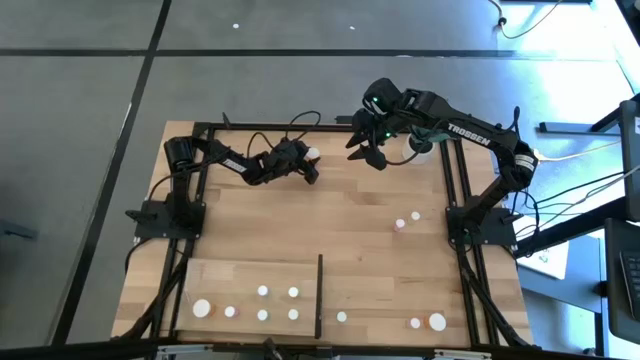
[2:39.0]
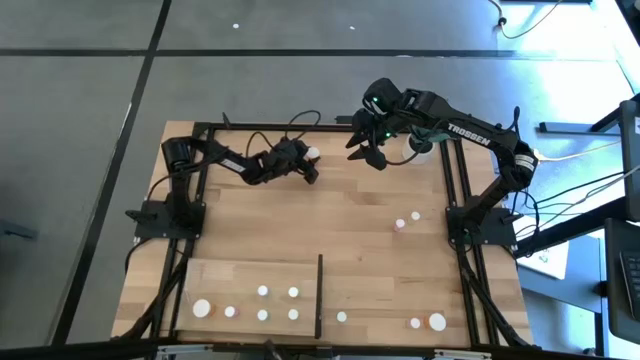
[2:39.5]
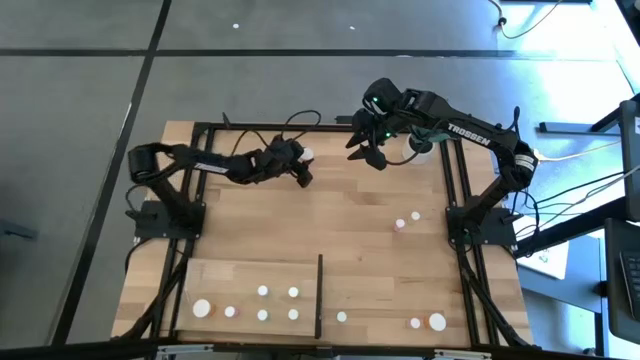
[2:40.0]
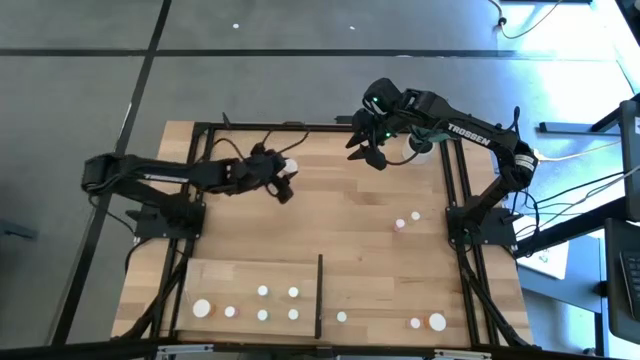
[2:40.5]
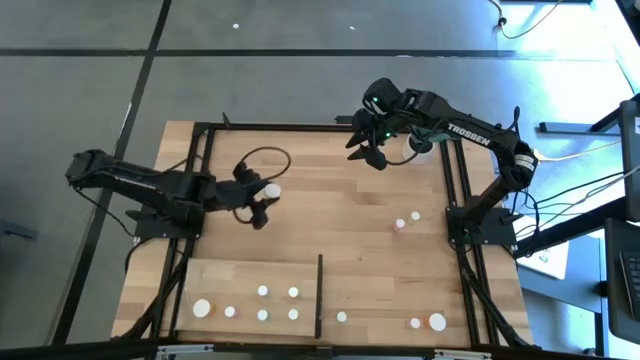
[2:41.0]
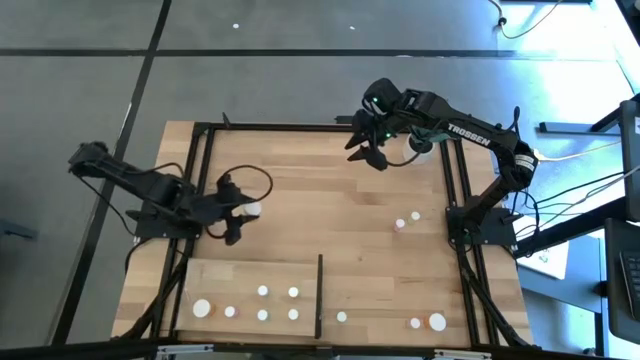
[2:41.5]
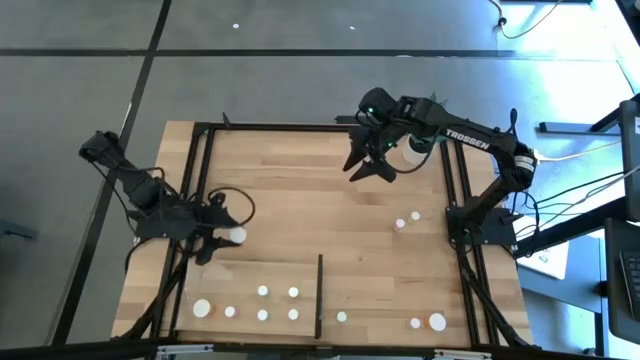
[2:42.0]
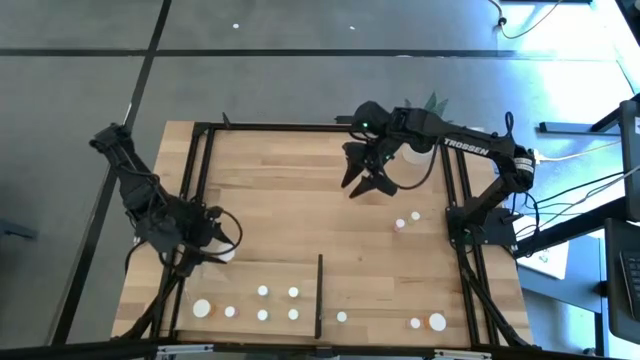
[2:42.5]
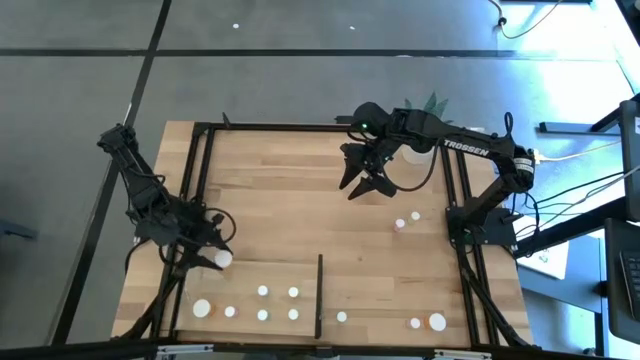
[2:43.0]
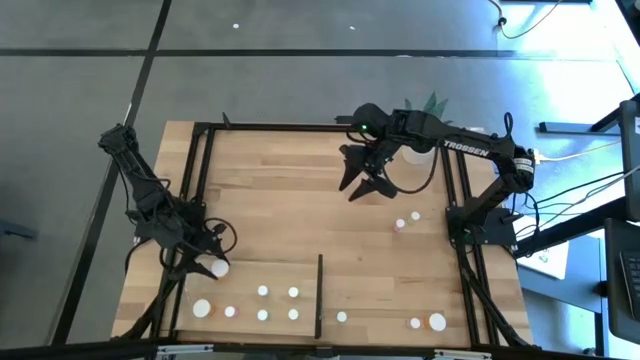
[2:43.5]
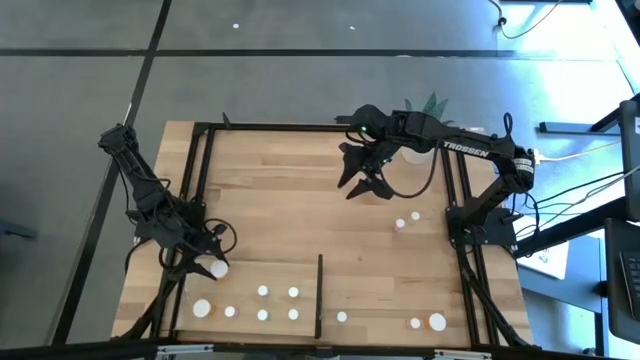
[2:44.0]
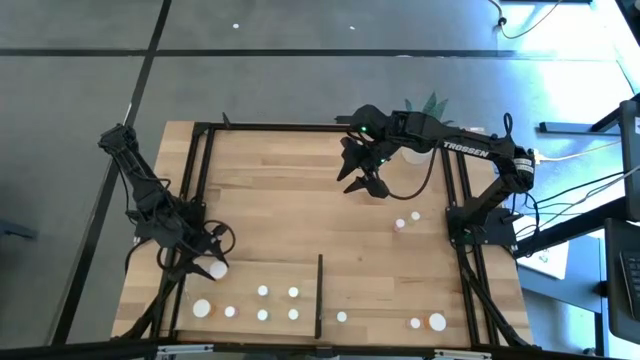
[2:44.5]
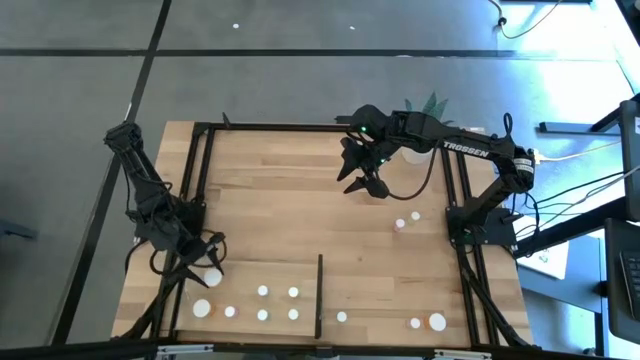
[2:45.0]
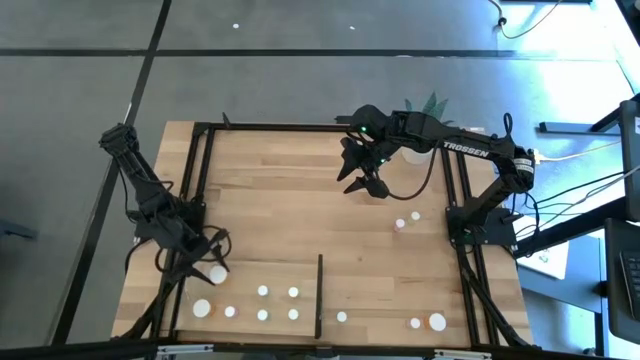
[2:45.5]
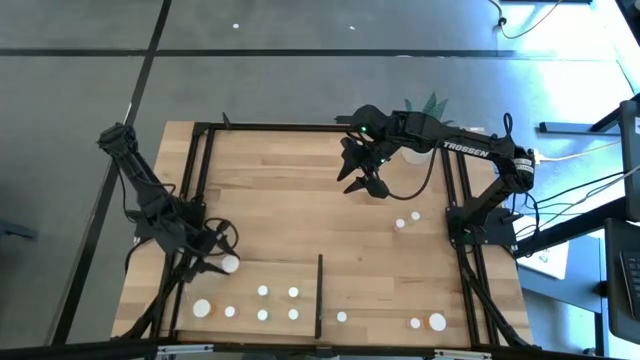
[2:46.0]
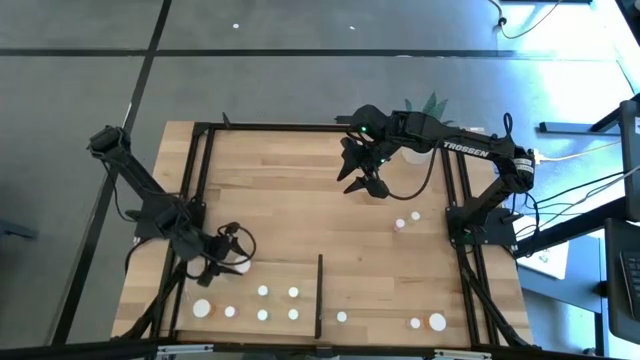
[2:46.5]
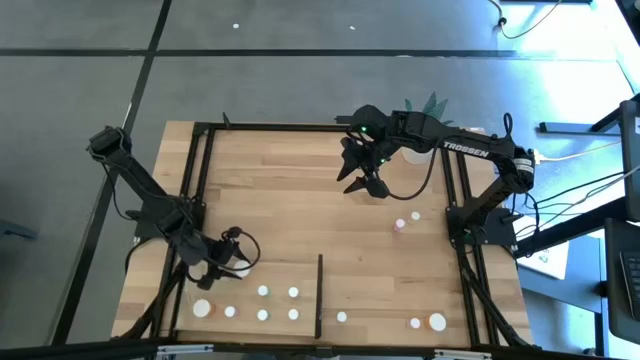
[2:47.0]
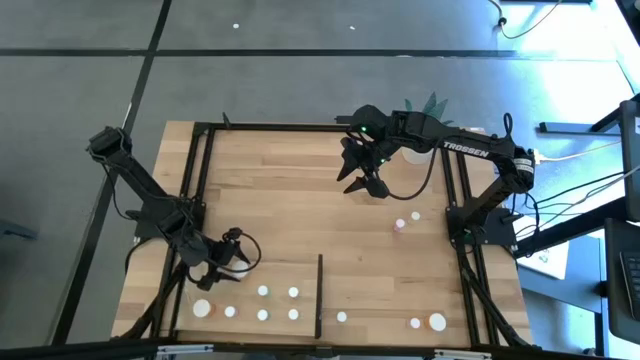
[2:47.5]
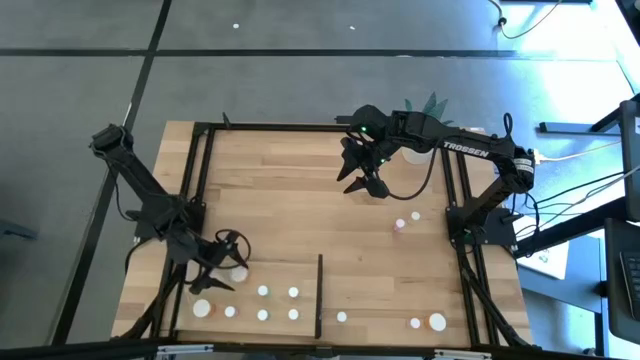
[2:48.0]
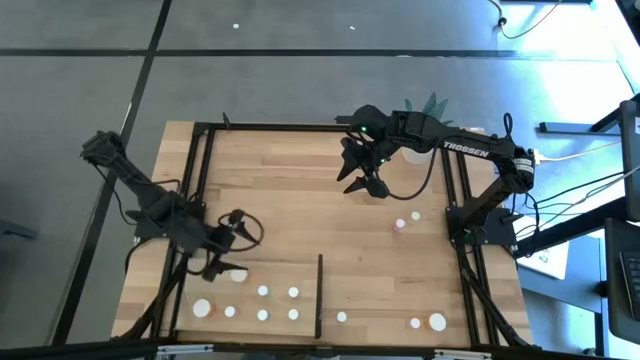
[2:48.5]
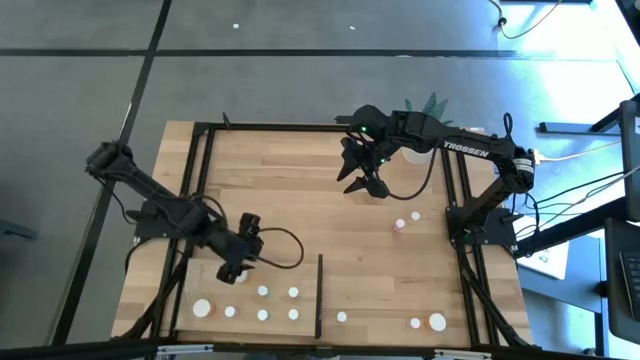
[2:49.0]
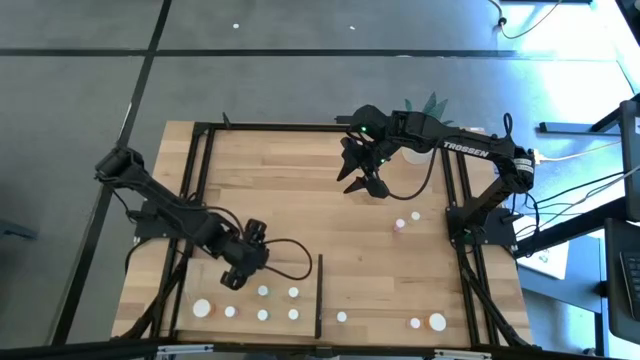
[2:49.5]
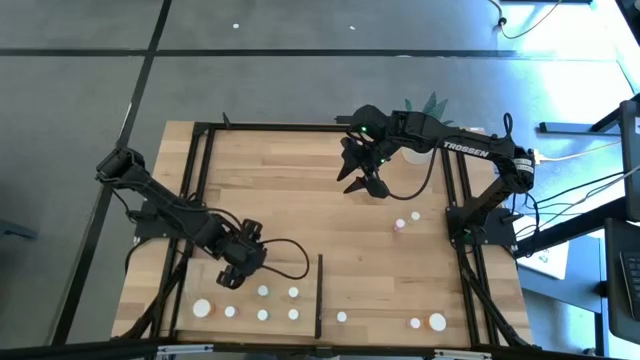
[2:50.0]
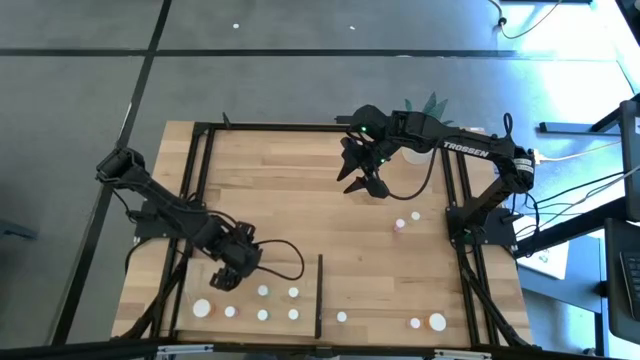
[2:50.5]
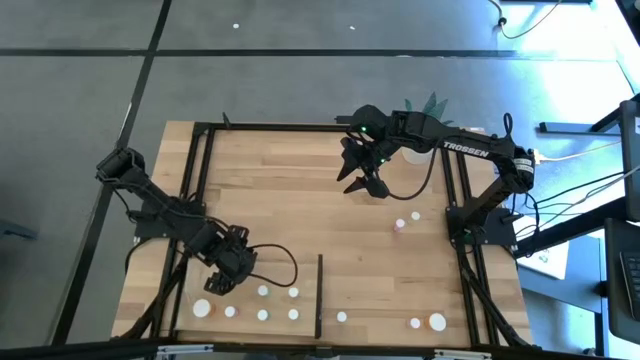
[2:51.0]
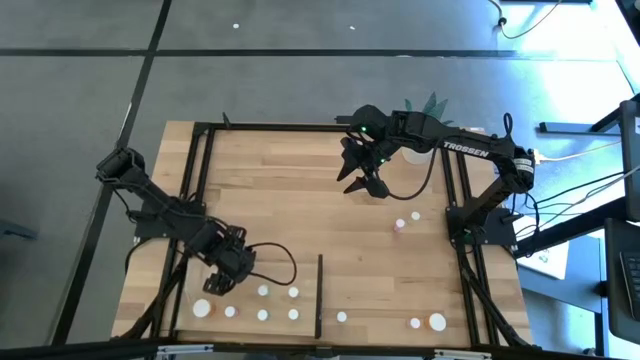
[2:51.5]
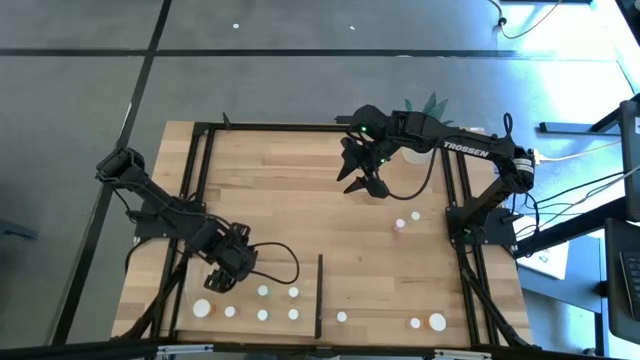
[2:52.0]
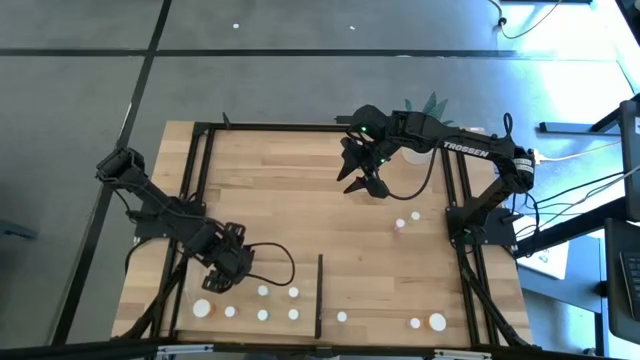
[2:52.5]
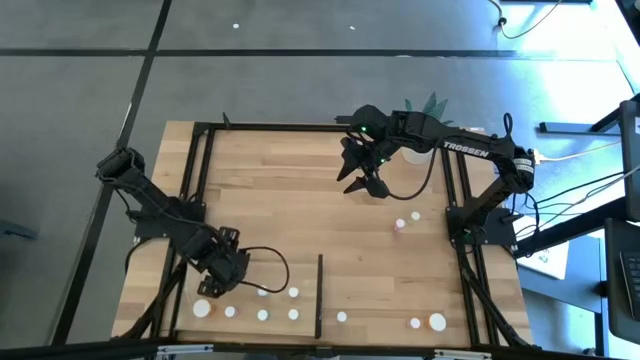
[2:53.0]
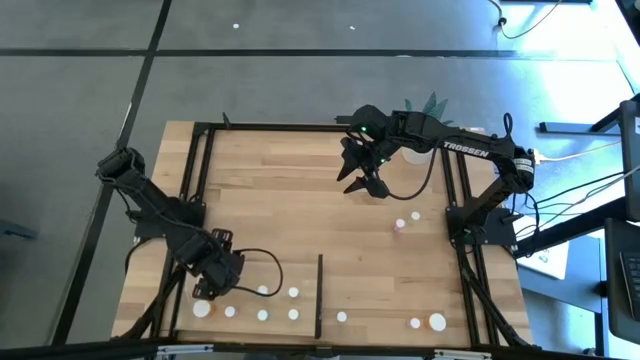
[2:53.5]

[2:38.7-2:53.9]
Task: Pick and place medicine bottles onto shelf by color
Put the top orange pill bottle on the shelf aligned with the other orange pill bottle

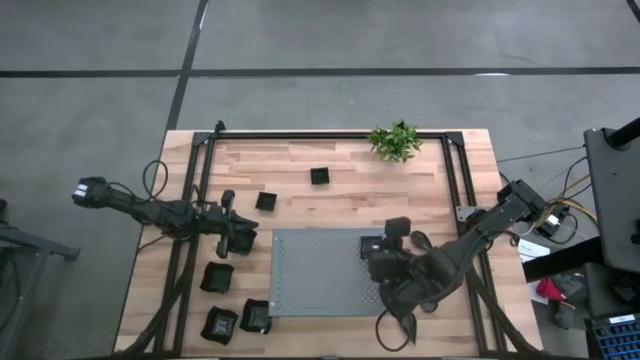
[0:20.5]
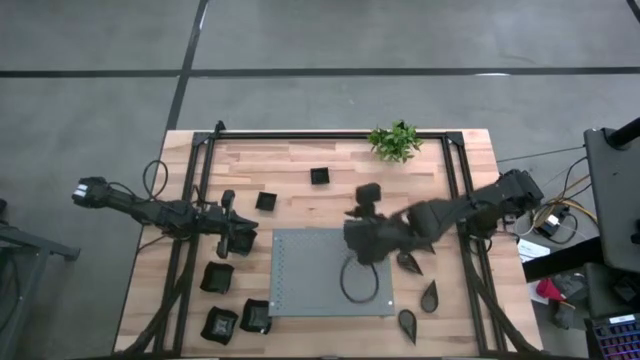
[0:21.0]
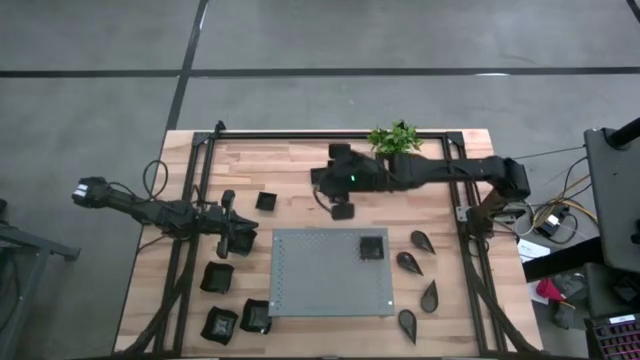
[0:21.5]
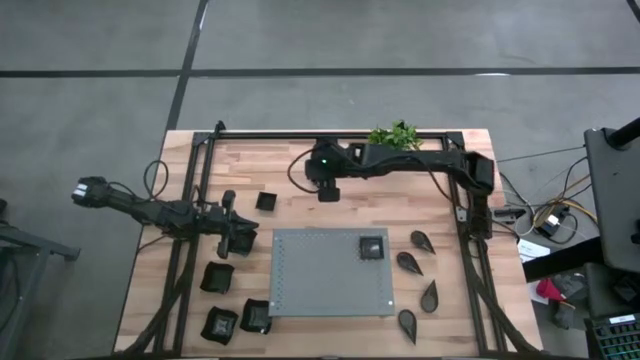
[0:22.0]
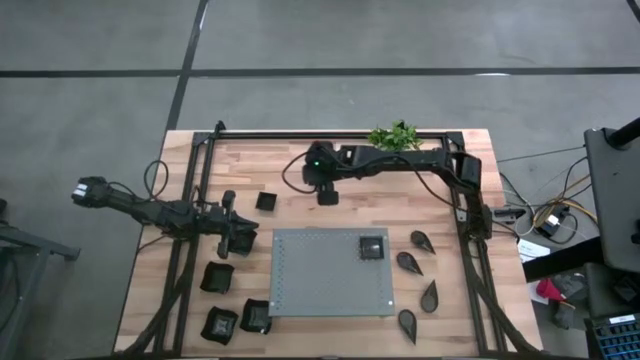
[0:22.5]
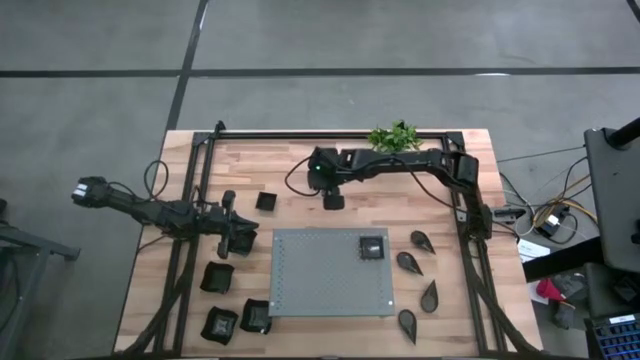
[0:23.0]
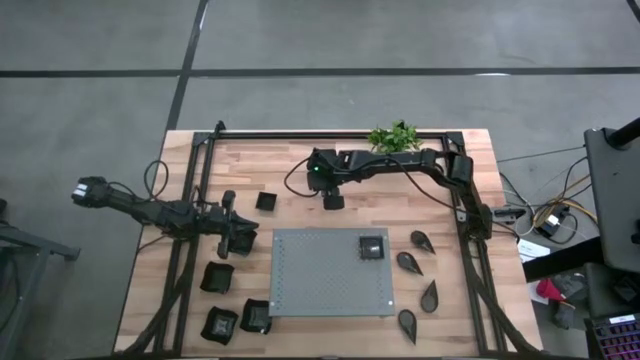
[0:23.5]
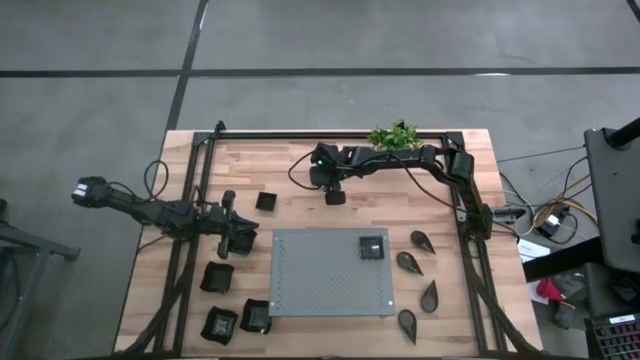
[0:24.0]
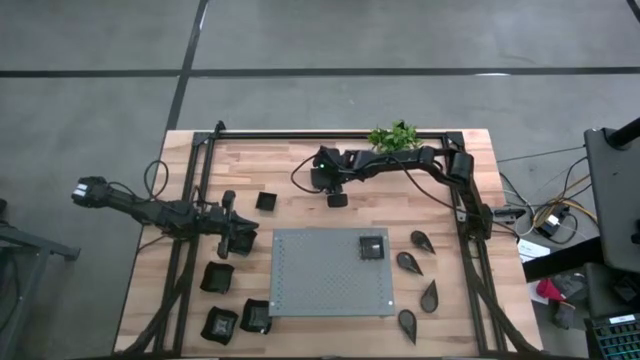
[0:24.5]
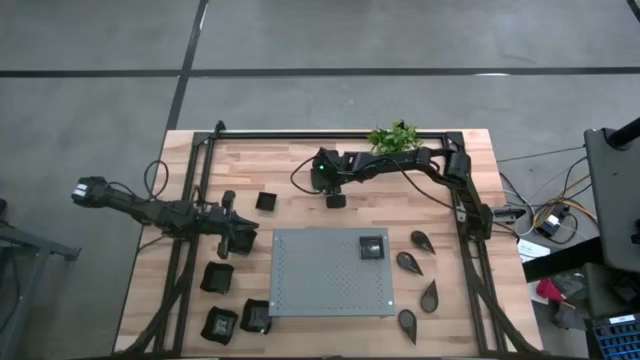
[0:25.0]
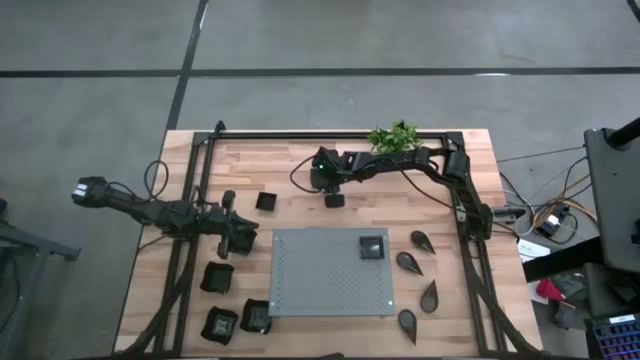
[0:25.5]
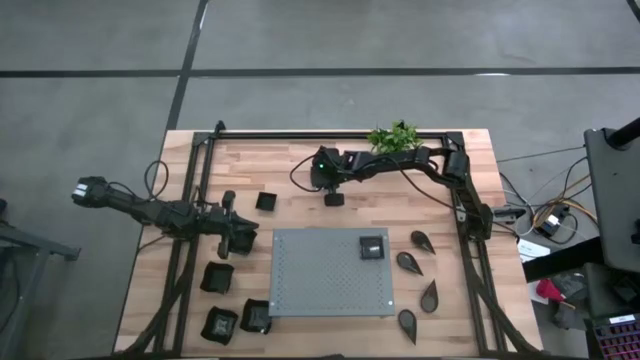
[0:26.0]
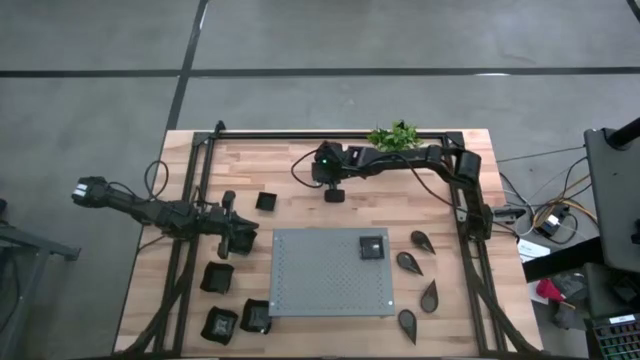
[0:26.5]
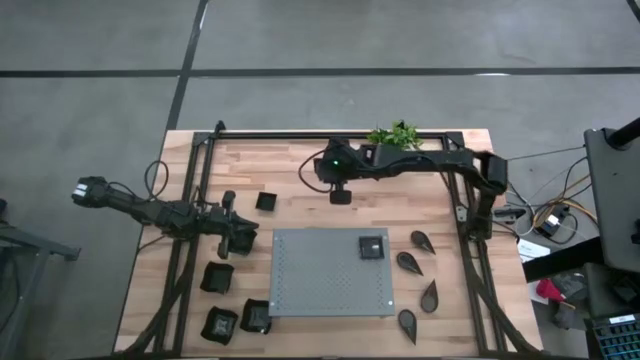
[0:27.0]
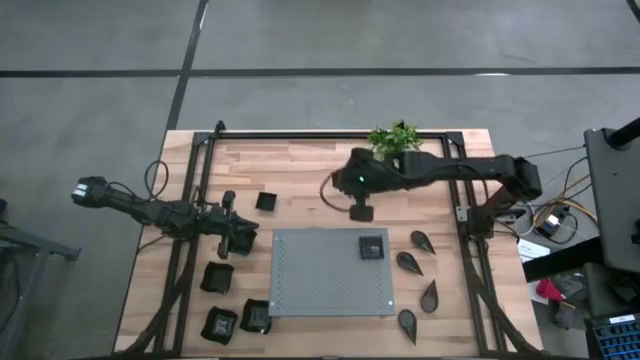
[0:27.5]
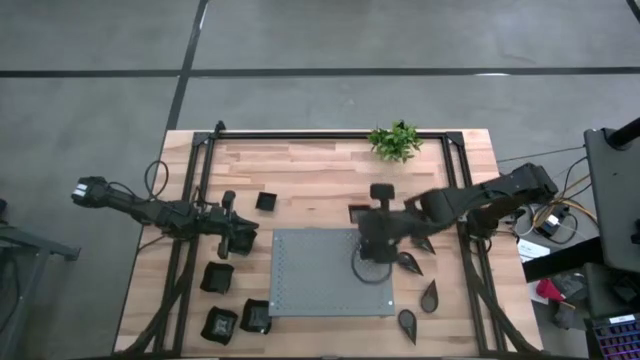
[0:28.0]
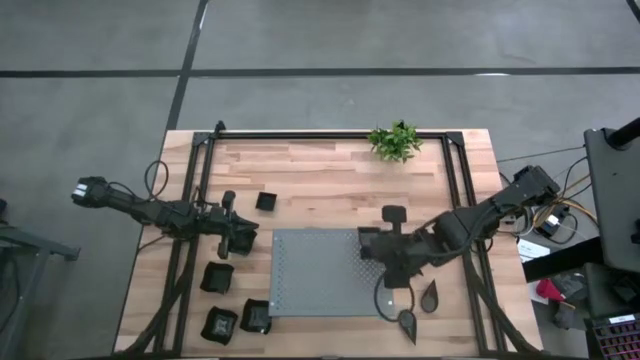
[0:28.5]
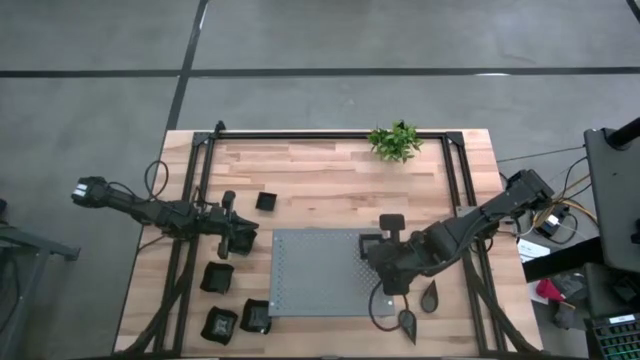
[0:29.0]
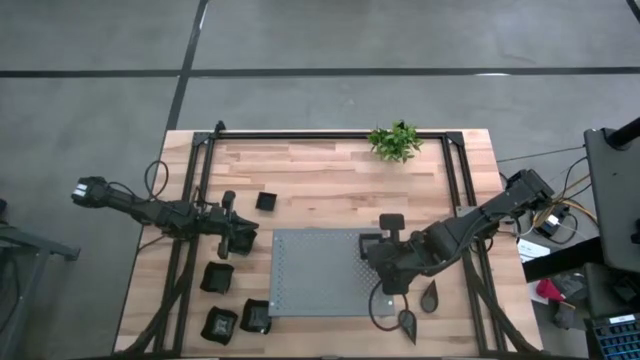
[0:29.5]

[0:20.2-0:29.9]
Task: Pick & Place Mini shaped plates
Stack the square plate on top of the square plate on the shelf
